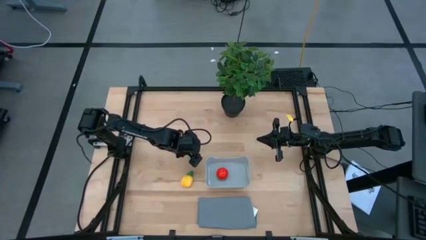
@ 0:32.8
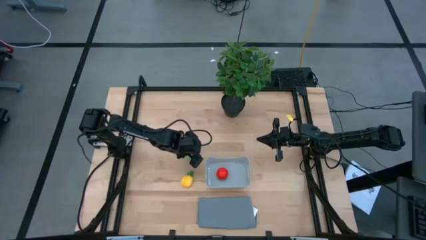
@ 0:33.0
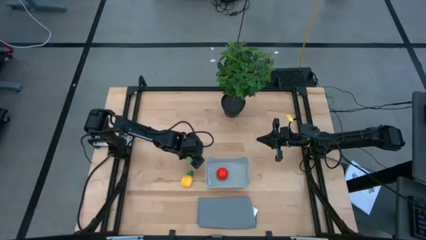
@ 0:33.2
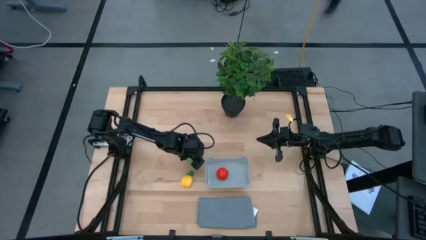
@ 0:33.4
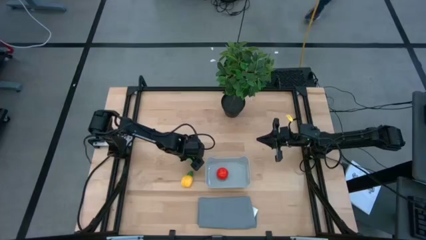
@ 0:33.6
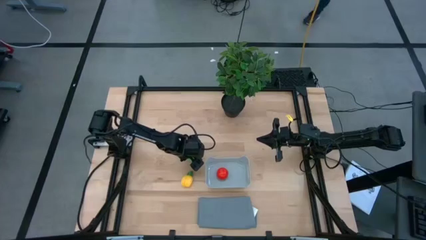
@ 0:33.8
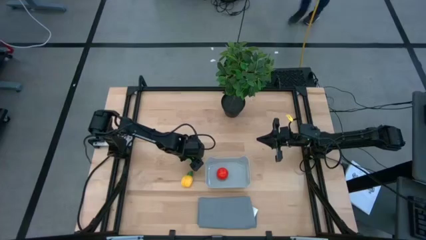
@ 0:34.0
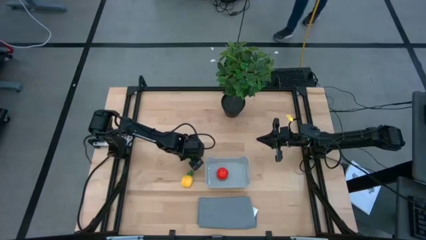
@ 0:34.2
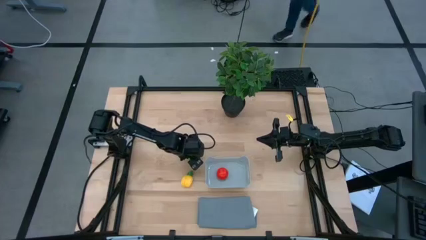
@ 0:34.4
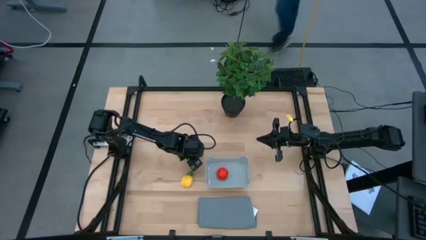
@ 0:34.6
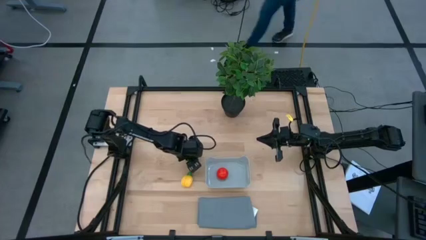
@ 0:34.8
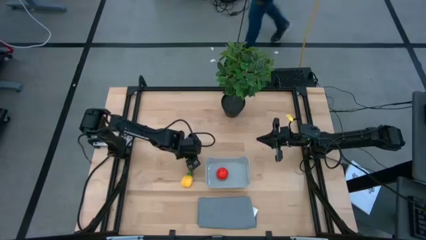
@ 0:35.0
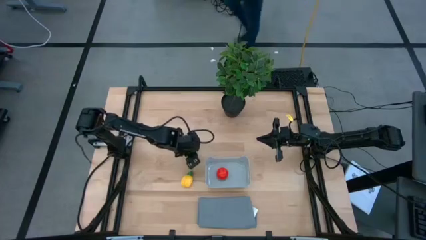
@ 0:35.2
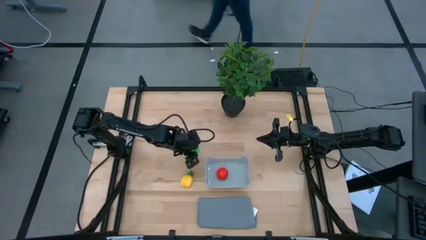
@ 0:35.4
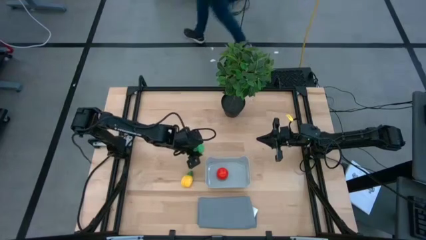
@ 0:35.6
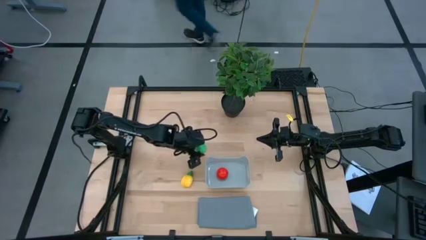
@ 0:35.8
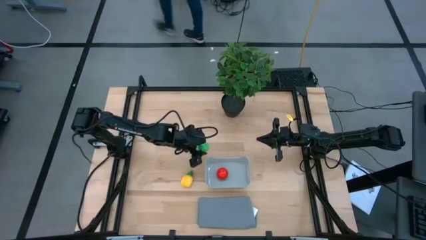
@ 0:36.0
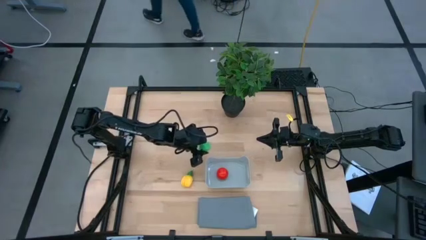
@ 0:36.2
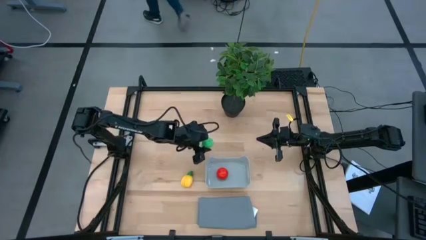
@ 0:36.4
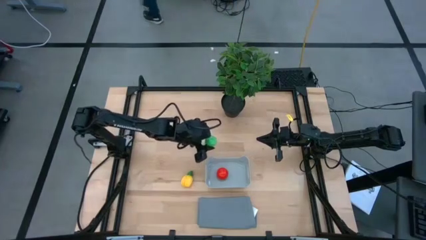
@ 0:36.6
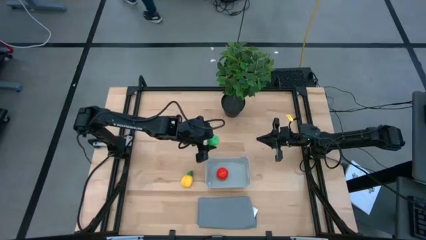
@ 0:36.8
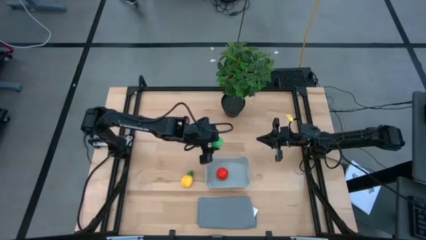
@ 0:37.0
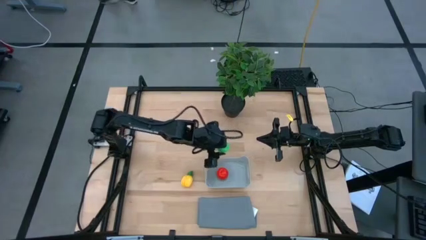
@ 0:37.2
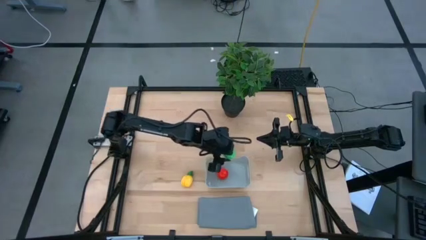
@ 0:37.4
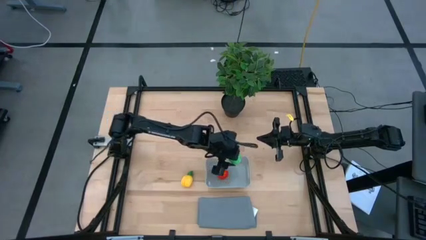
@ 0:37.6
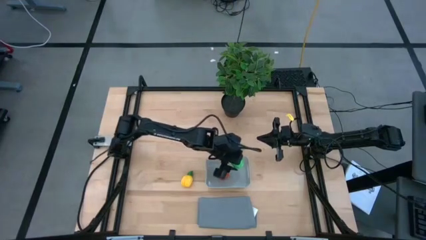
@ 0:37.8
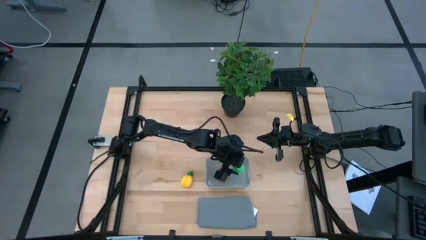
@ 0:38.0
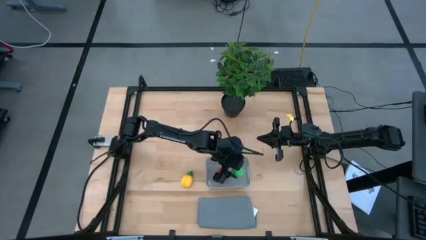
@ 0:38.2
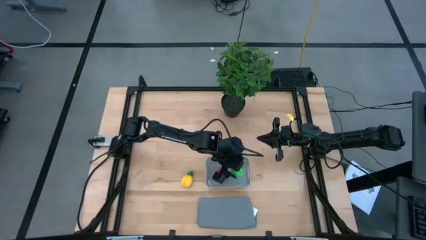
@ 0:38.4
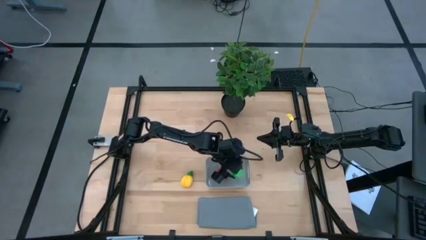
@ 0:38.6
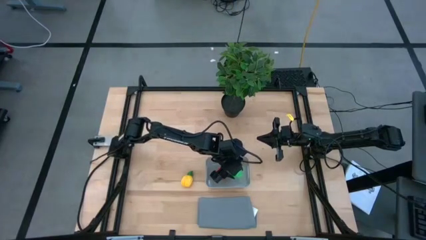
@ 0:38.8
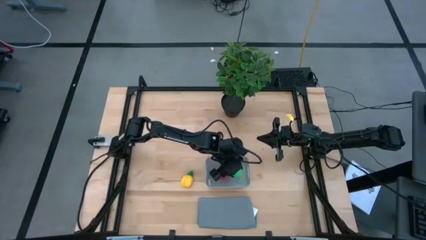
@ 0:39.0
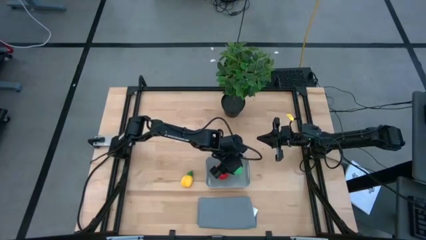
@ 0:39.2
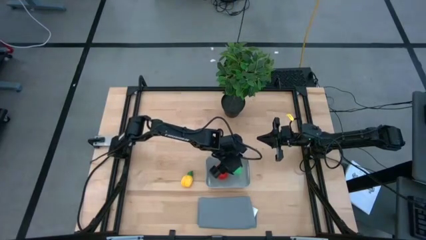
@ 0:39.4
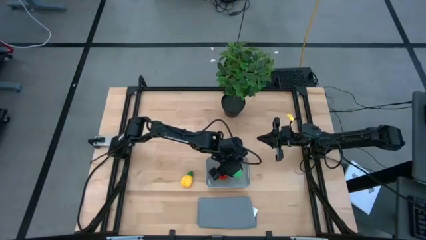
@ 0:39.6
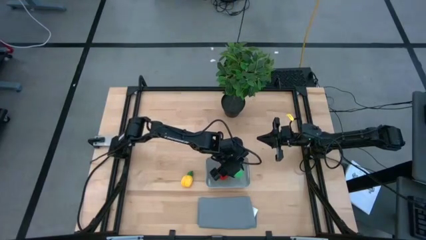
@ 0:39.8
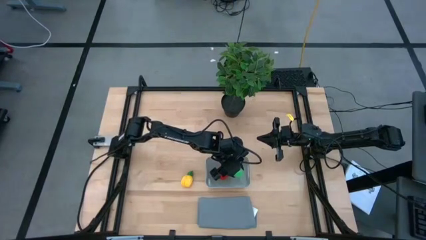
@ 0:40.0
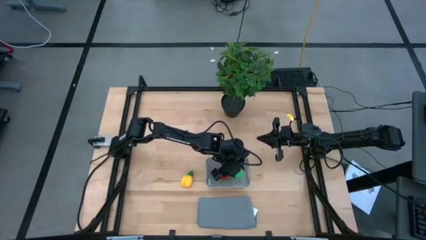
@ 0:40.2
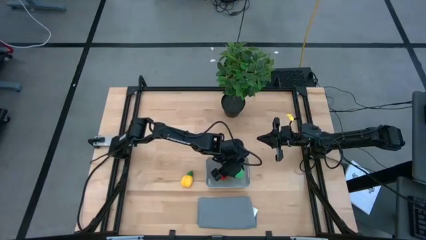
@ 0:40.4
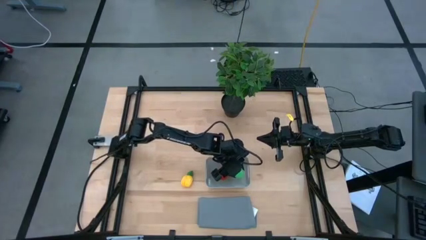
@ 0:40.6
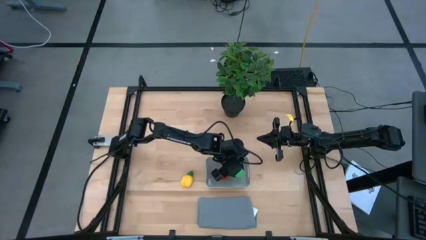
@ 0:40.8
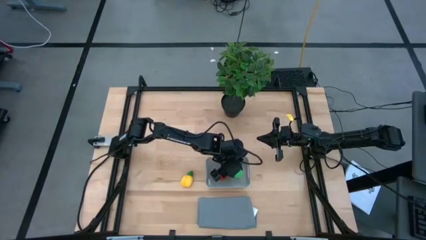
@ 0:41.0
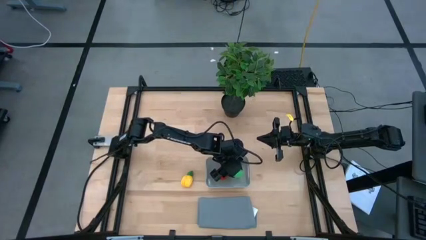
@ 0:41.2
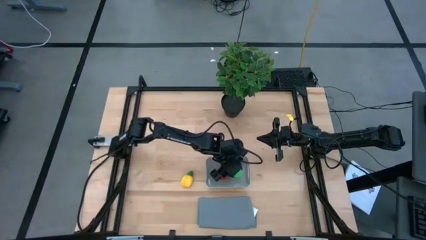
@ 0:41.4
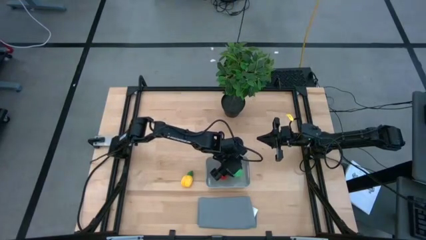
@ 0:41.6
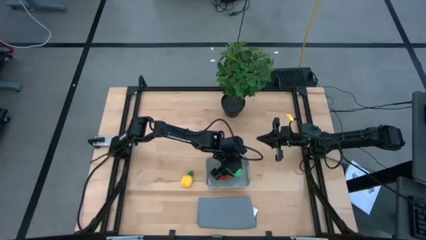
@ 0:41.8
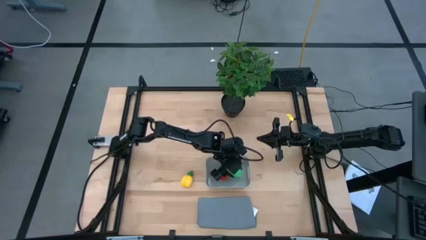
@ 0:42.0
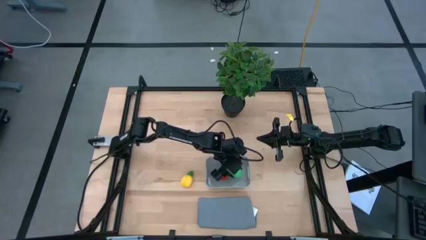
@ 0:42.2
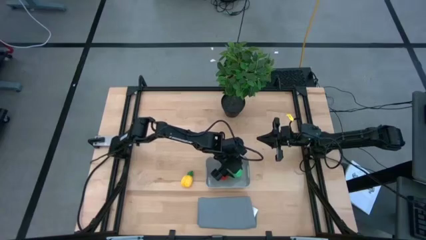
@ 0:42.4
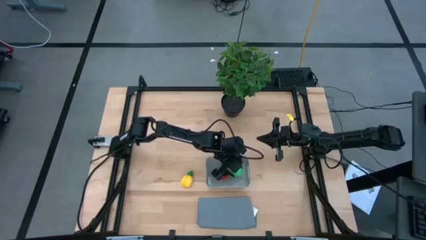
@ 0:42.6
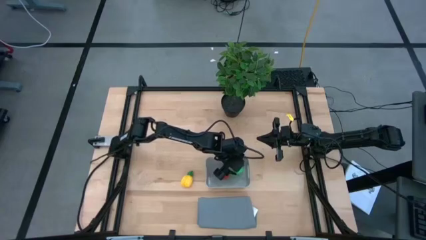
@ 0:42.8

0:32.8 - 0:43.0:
Task: Pick and placing Produce into tupperware
Put the pear into the gray bin

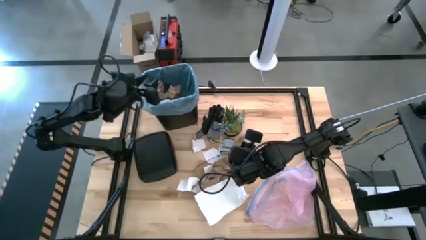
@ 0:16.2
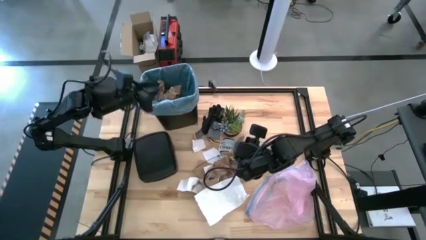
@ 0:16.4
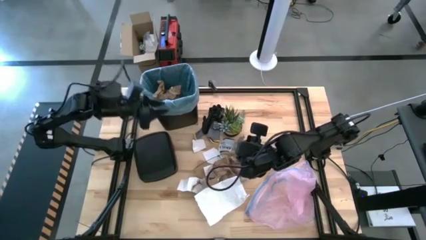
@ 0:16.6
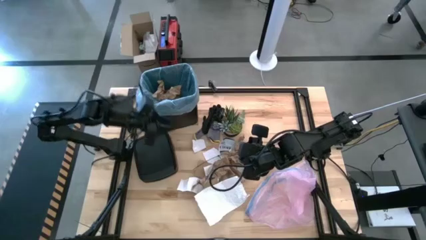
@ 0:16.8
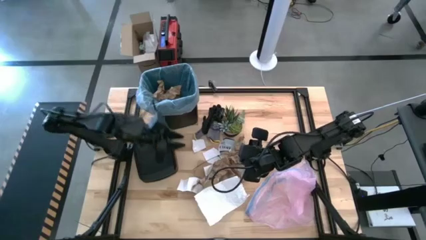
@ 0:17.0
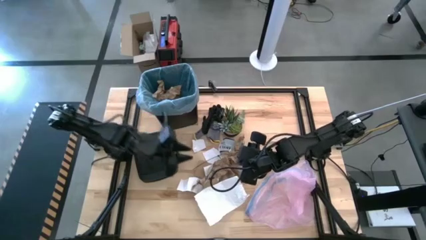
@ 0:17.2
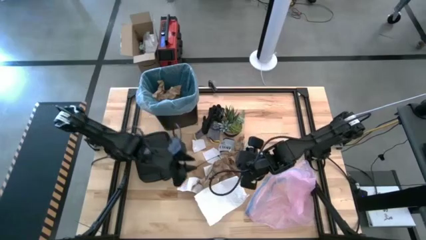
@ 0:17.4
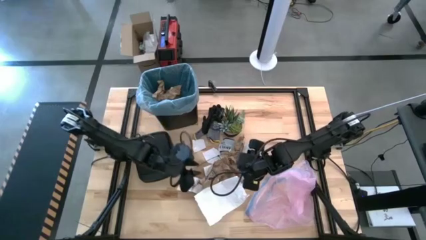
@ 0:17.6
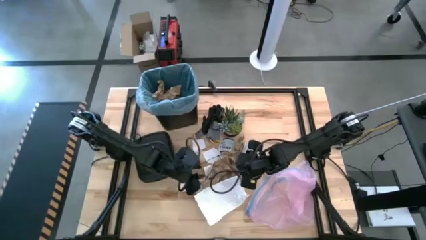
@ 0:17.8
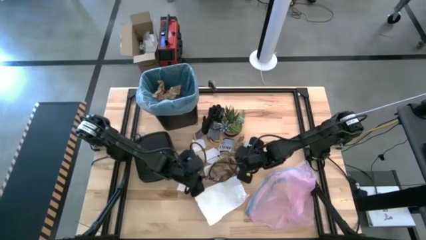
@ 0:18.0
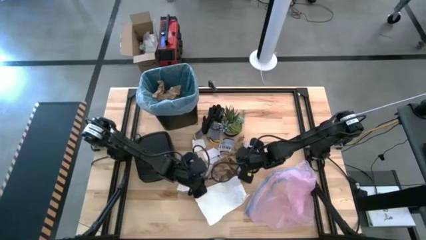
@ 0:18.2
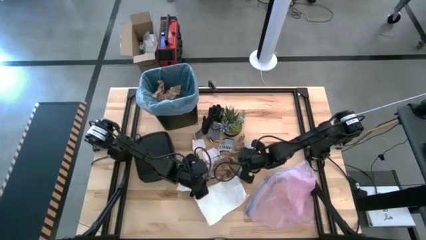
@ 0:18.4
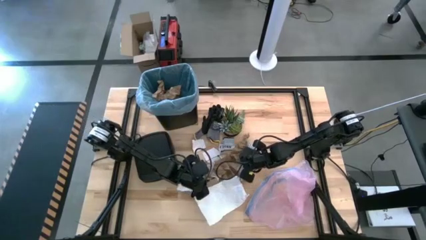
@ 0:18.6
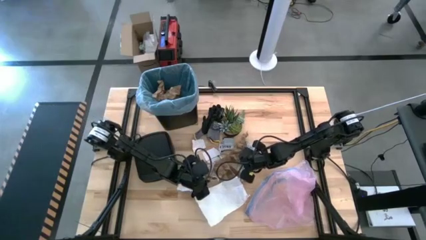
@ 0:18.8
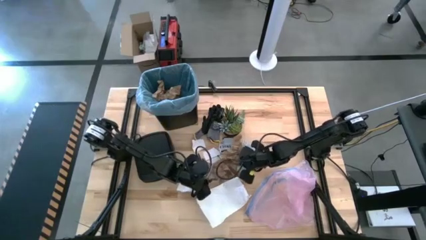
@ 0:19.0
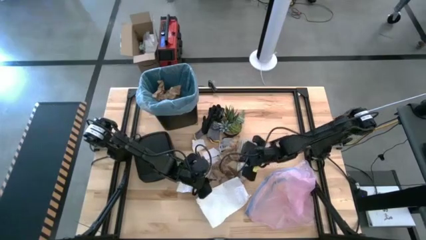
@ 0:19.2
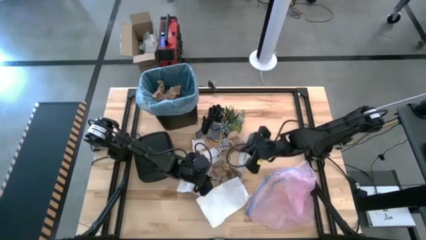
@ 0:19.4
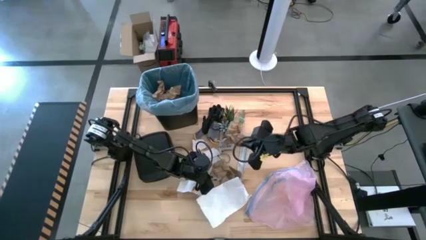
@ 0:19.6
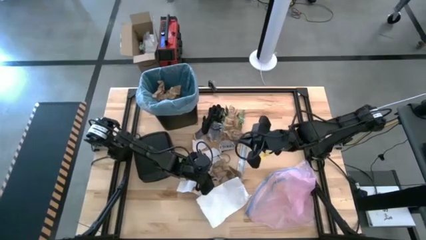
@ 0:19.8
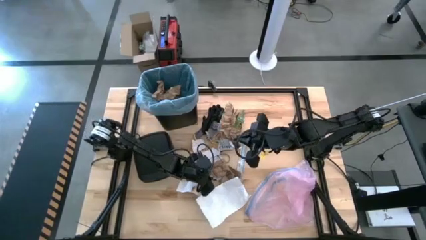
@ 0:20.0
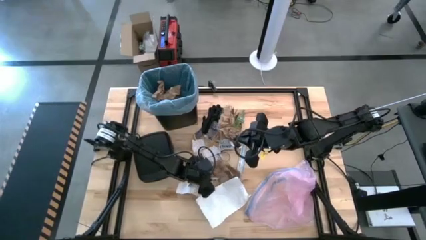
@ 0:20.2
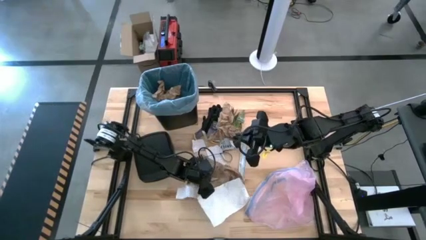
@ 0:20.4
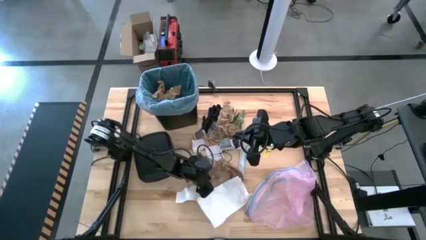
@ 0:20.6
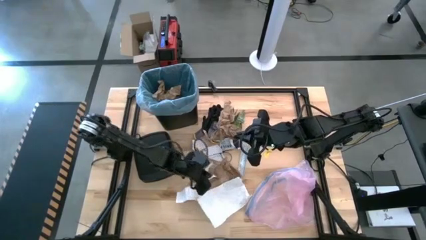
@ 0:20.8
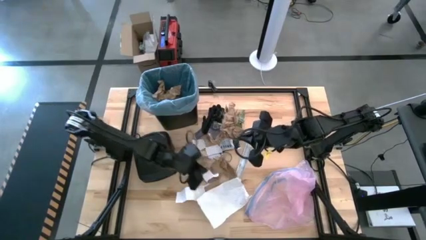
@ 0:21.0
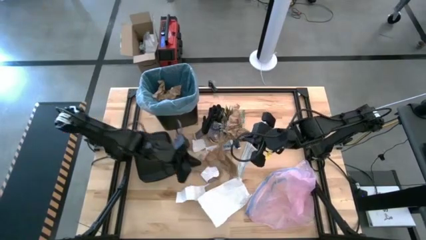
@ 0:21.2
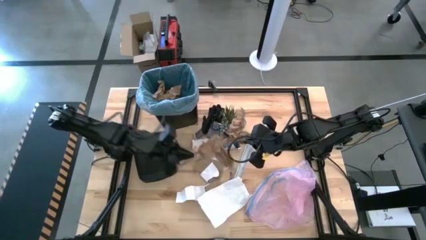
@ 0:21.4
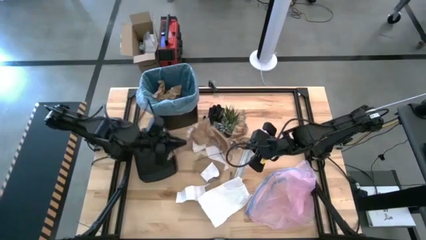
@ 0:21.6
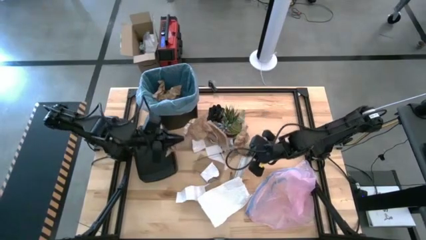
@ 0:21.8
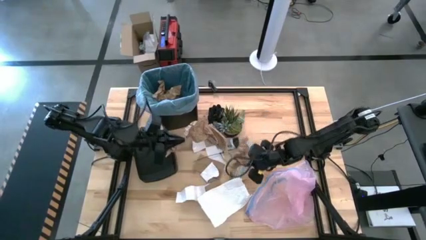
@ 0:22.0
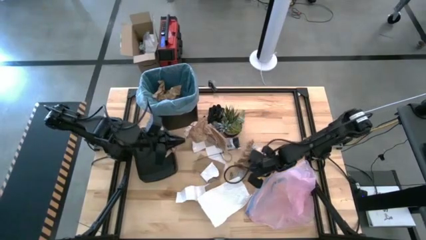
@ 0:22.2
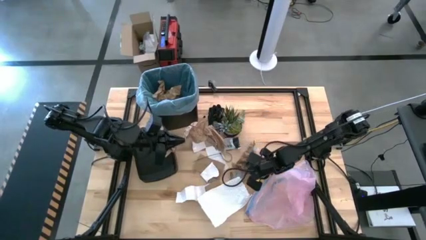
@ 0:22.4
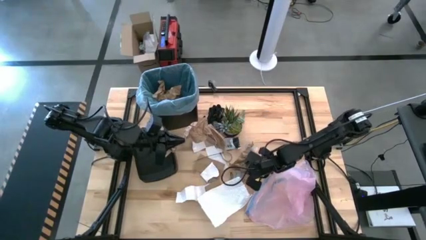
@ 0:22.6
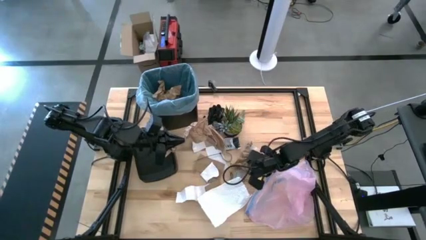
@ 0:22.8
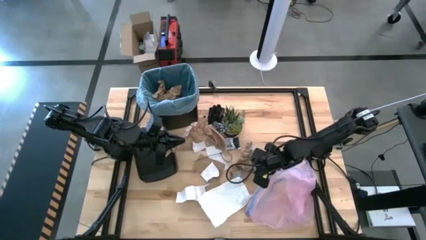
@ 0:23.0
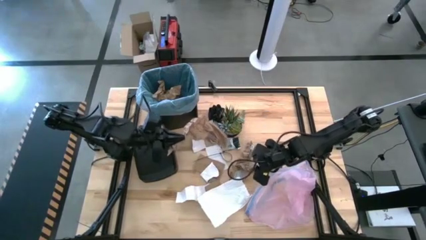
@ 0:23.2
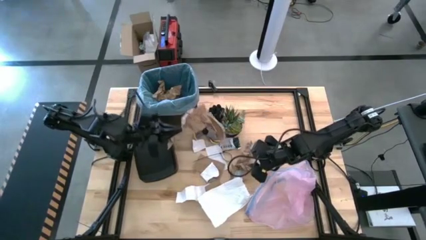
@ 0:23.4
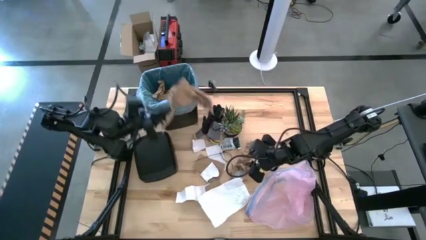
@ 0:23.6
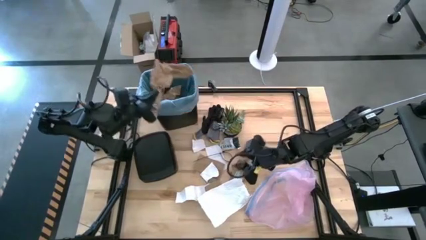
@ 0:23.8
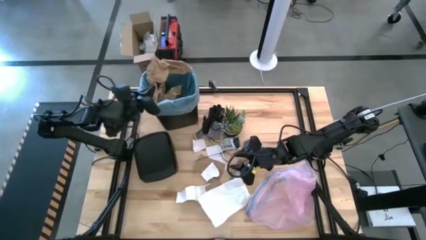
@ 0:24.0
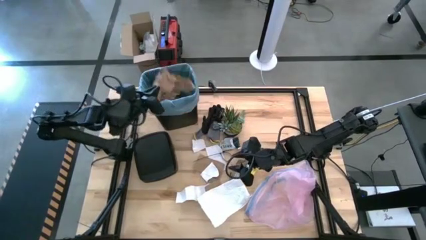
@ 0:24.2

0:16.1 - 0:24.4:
Task: place trash/remove bag and relplace
Put the brown napkin into the trash bin
